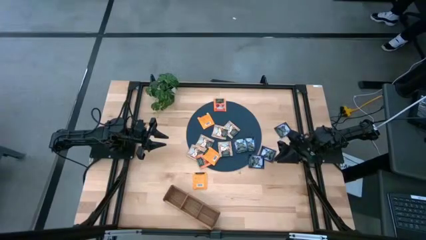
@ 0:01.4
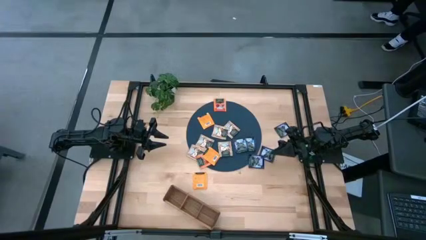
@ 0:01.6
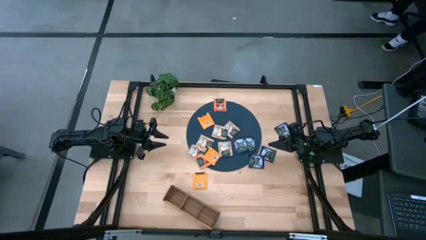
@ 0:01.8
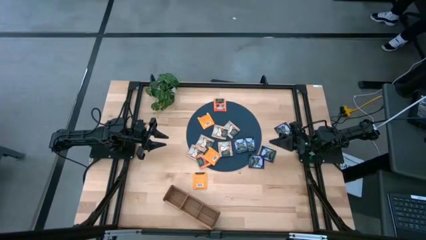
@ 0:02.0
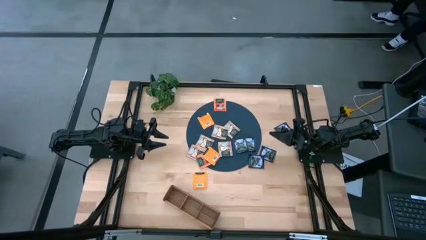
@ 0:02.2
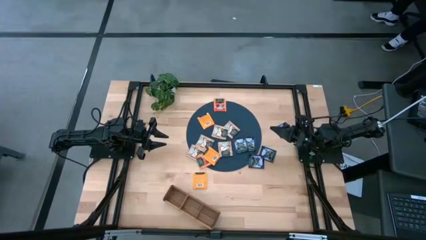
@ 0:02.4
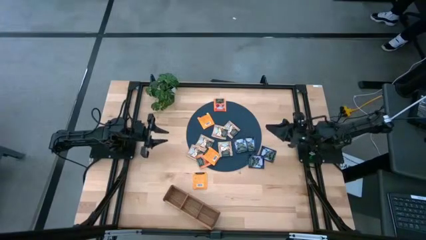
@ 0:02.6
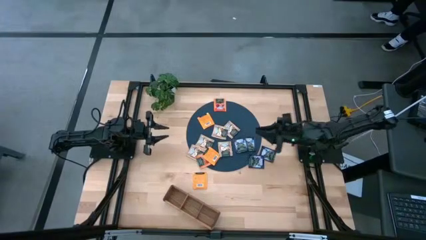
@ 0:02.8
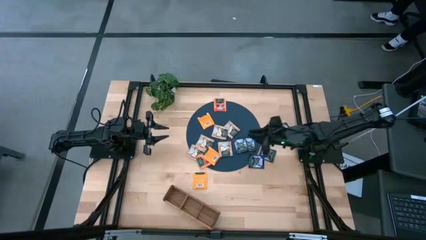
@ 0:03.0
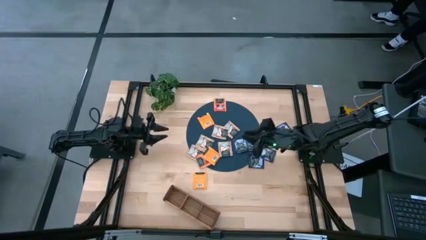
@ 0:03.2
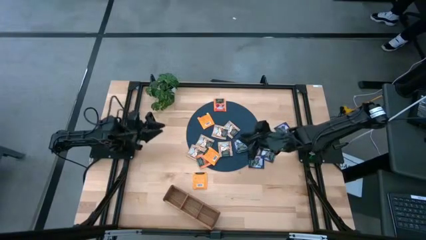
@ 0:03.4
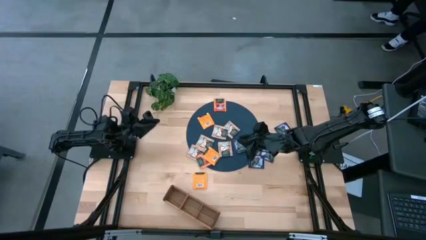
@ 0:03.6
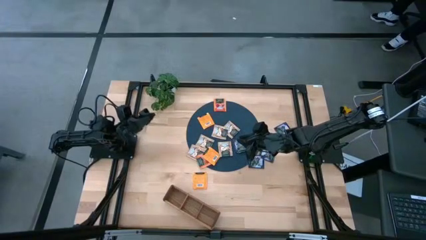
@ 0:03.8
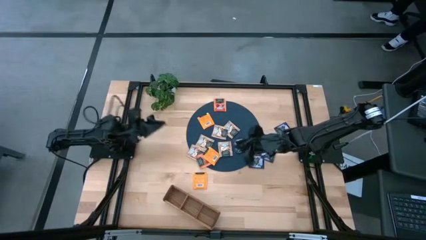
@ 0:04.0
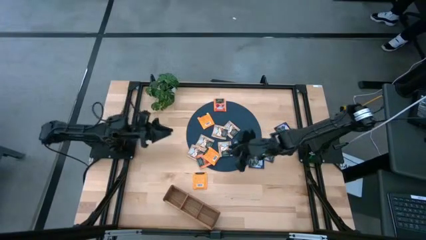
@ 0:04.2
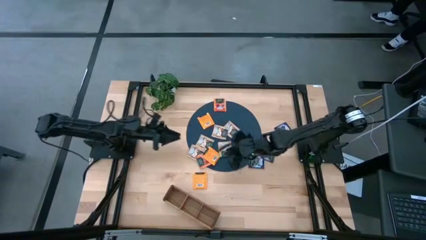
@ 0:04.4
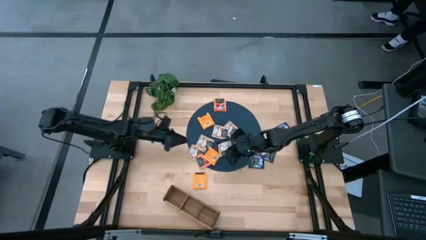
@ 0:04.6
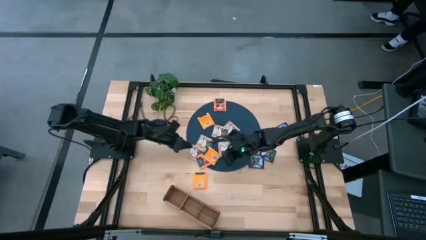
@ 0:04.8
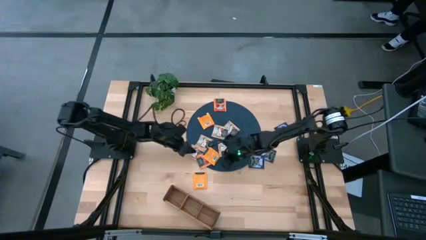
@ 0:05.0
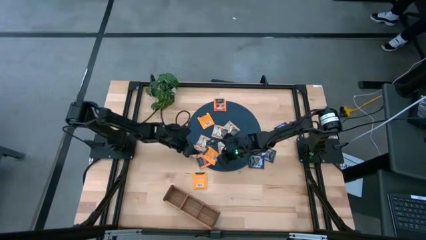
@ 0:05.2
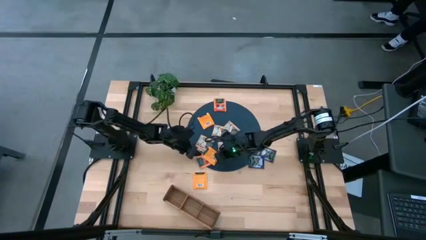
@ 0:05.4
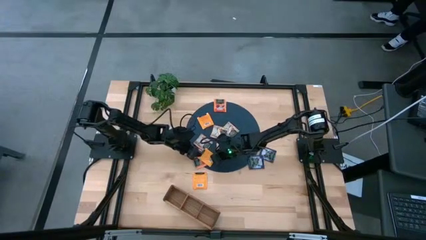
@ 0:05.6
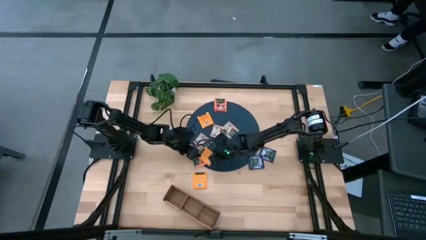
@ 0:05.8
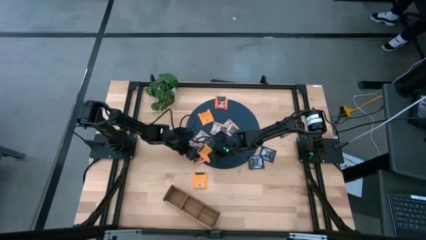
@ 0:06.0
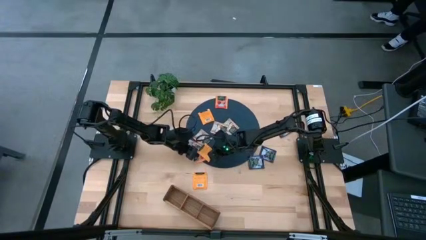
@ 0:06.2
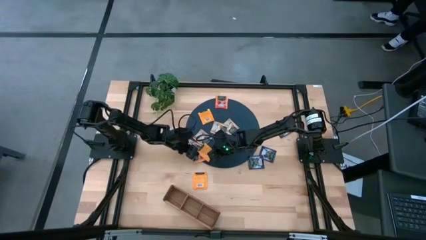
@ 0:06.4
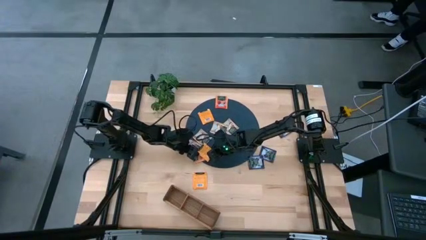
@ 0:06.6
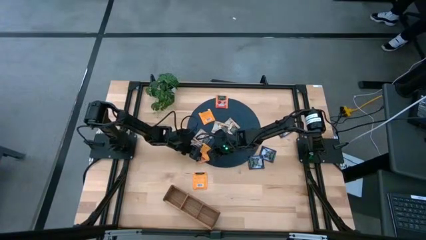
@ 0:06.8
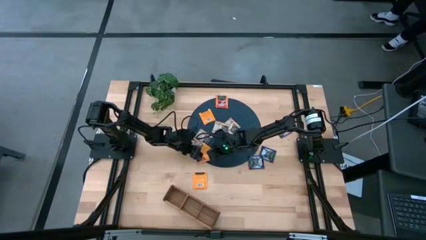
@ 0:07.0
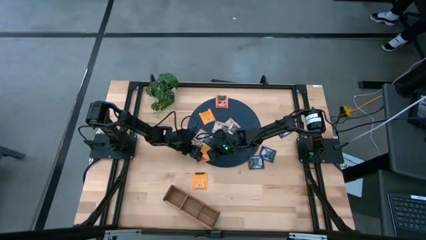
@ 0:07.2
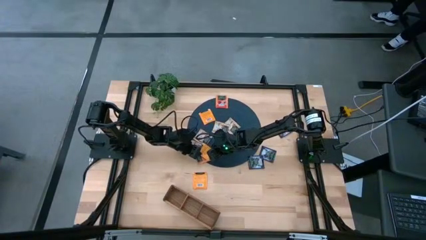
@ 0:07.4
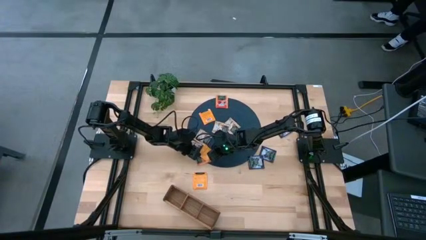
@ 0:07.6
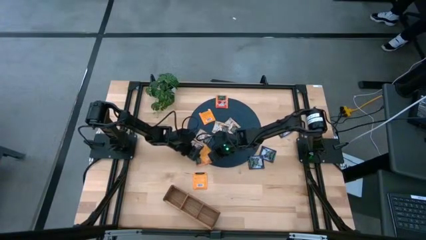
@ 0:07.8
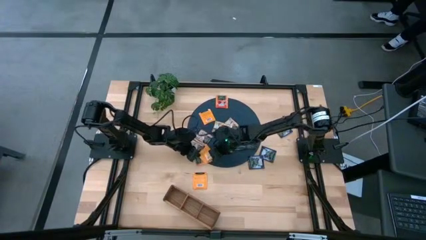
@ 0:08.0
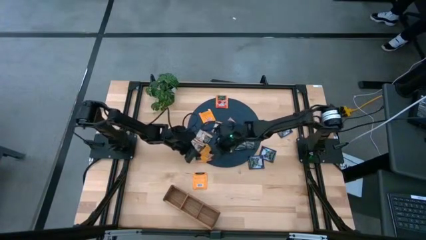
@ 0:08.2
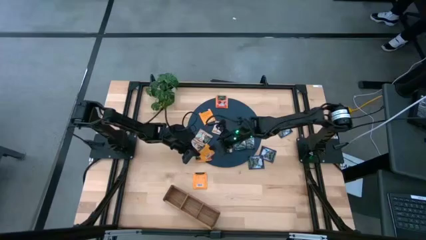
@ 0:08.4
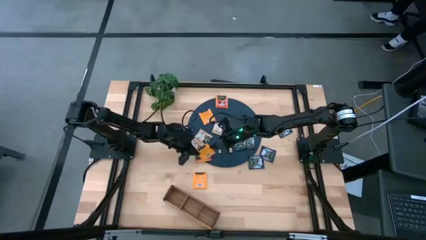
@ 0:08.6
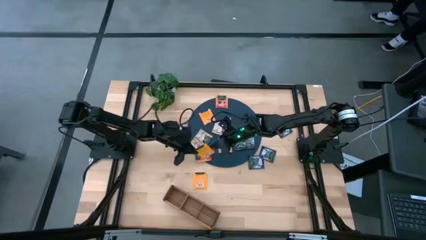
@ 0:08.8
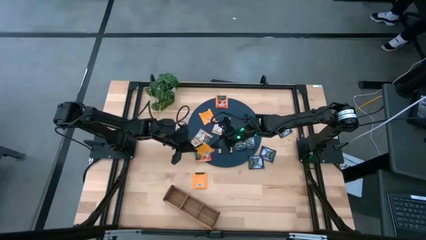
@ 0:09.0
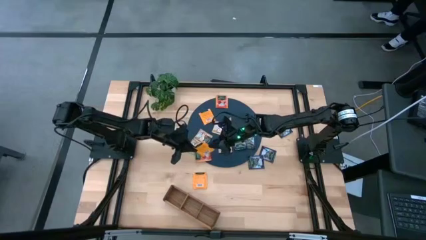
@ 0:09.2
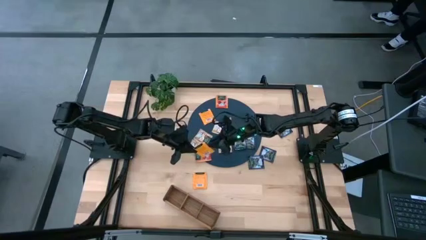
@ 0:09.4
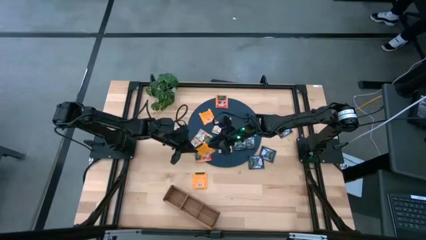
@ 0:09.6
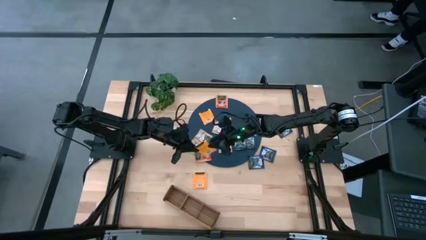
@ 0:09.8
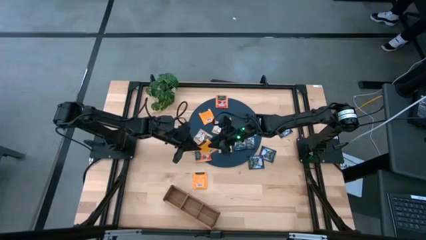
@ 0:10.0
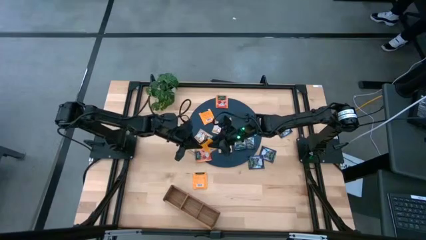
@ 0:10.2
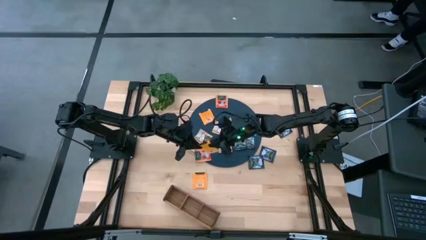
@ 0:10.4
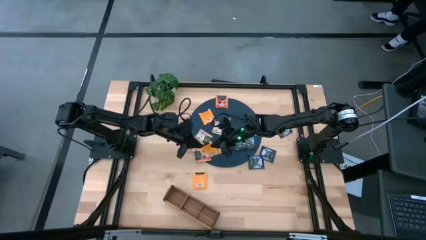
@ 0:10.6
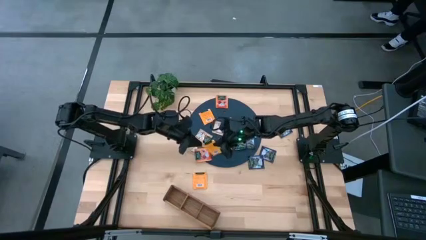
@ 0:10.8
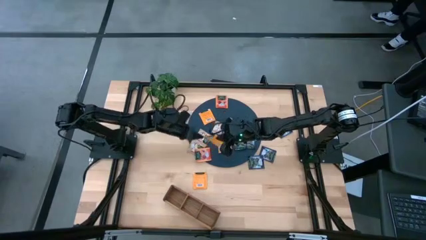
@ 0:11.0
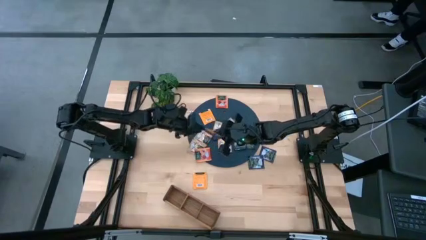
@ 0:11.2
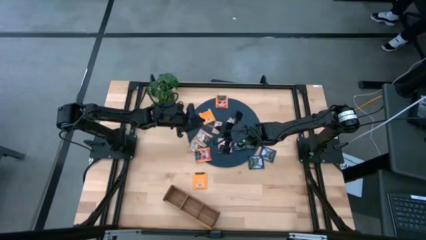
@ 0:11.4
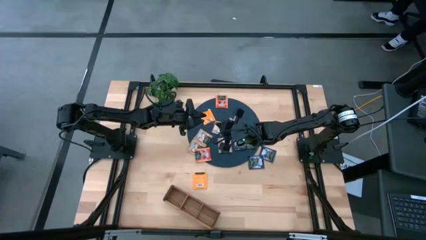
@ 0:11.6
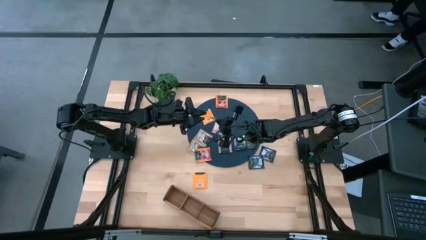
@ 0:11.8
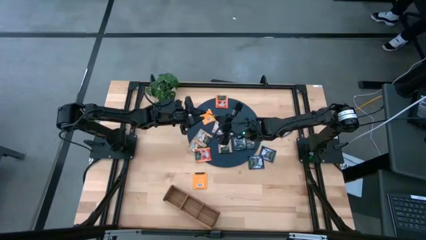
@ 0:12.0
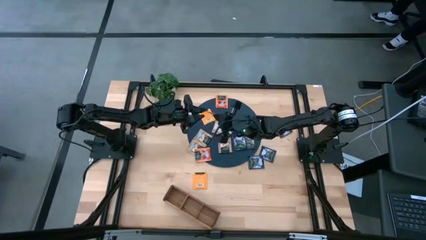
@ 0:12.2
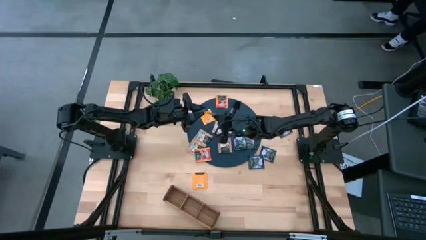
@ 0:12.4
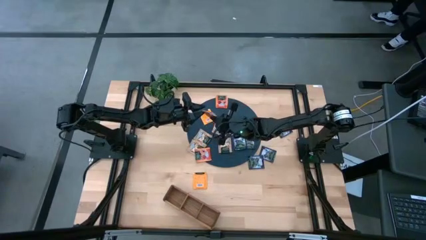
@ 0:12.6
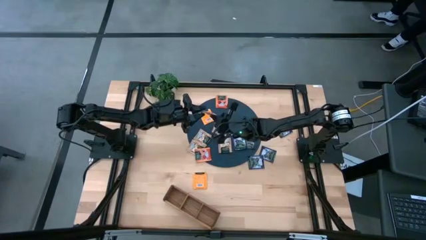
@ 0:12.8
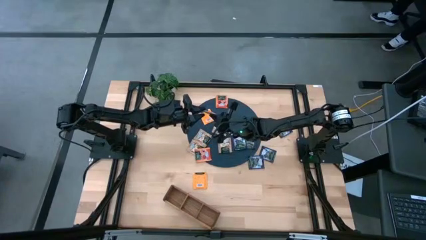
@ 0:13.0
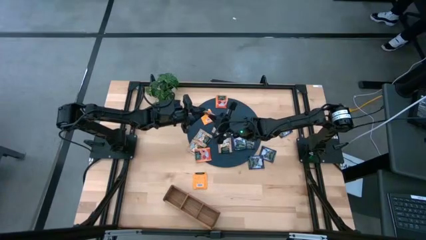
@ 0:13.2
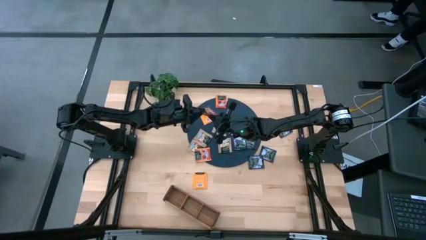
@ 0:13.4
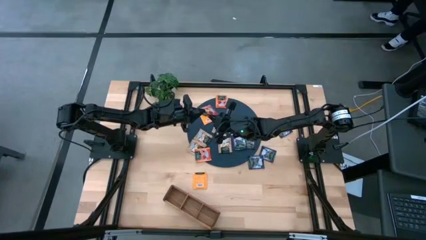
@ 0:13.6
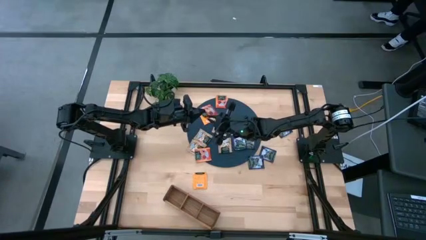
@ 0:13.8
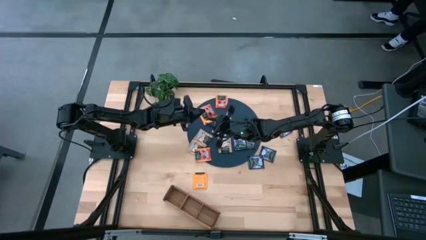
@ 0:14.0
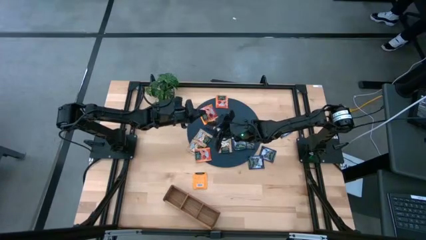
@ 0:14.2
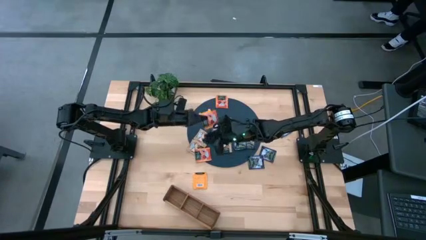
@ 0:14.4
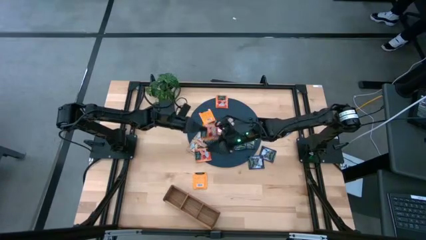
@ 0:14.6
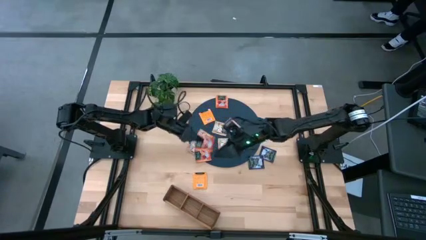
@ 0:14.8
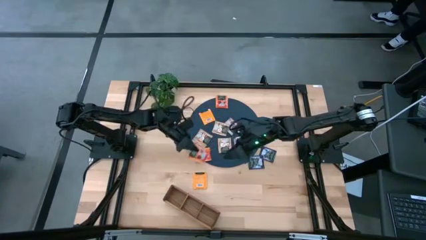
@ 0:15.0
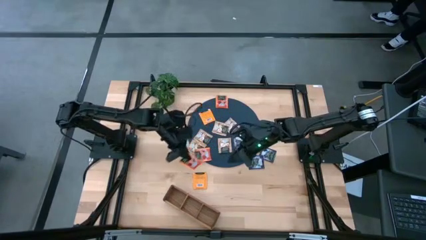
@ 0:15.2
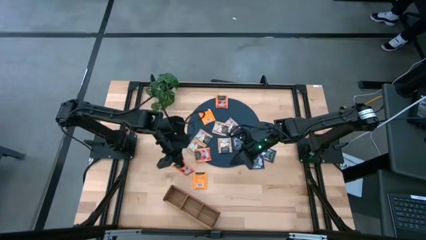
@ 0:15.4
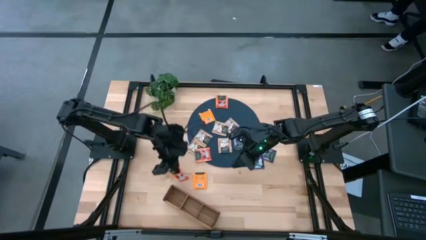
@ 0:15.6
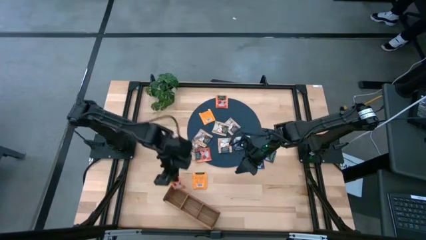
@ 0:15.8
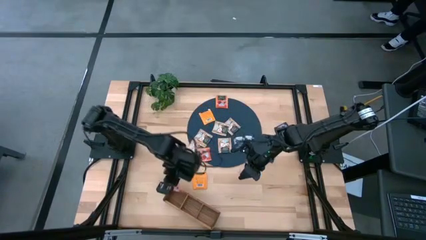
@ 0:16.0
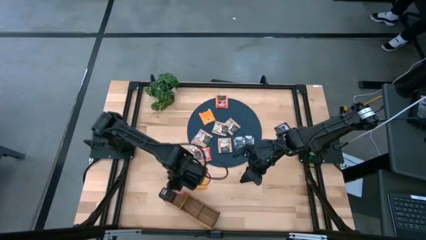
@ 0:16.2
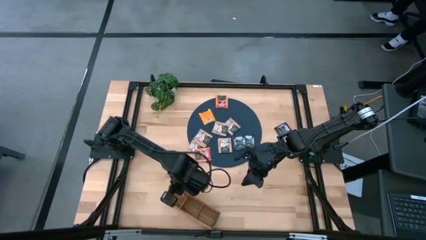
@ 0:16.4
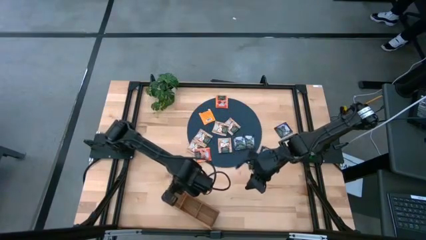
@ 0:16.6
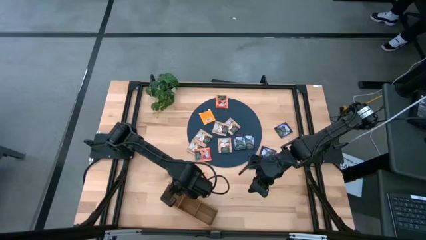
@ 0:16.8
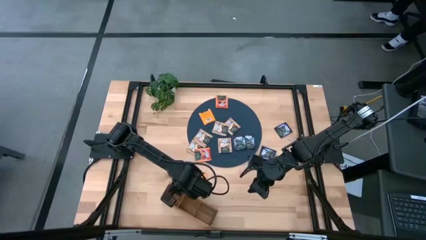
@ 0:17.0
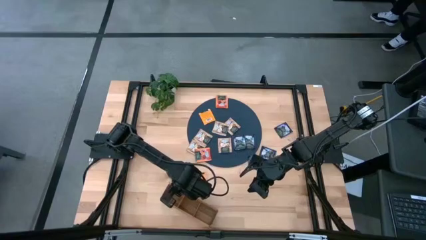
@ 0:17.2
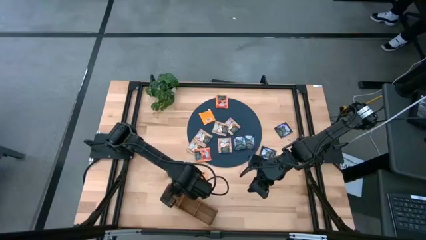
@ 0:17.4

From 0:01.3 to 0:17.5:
Task: Pick & Place Tea
Put the orange tea bag into the left section of the wooden organizer
